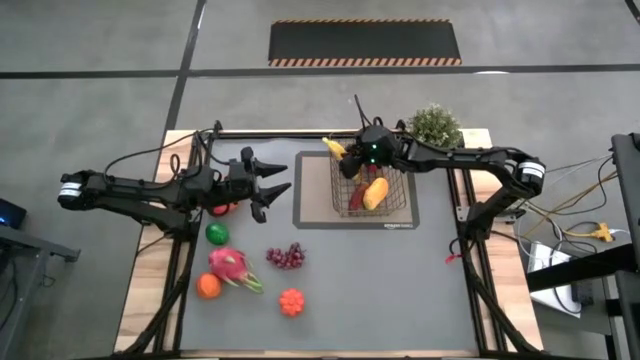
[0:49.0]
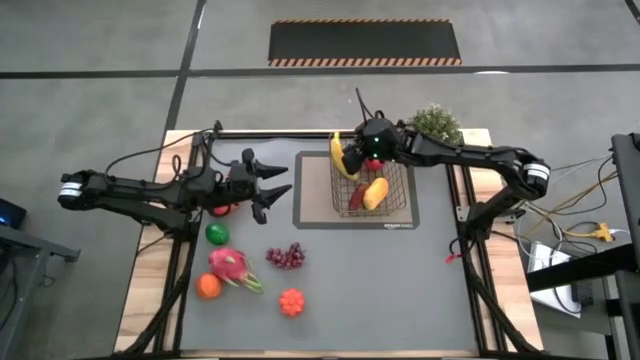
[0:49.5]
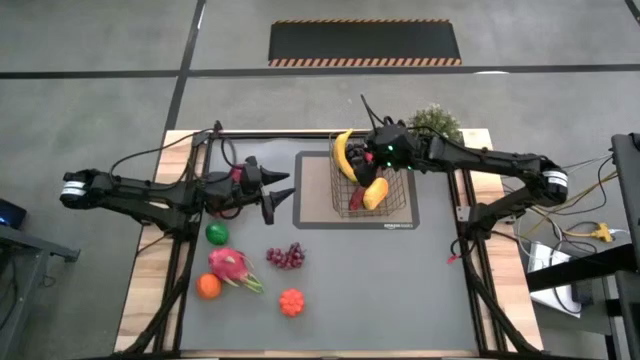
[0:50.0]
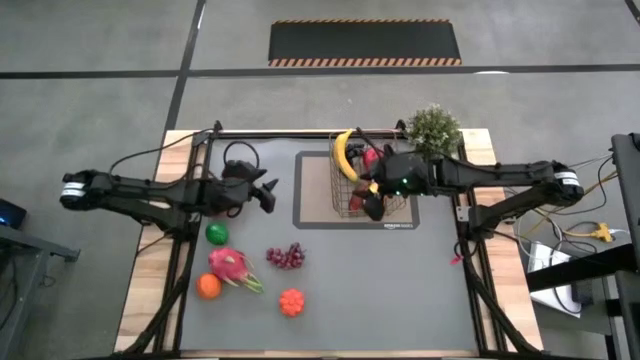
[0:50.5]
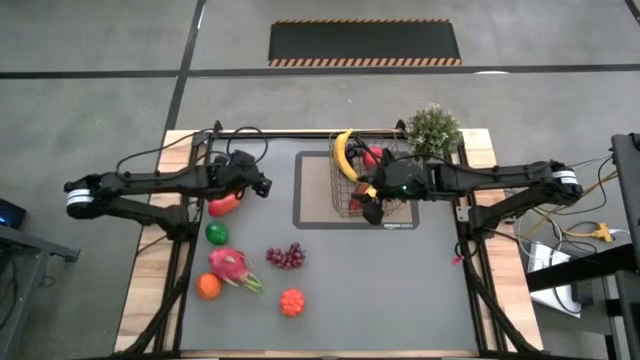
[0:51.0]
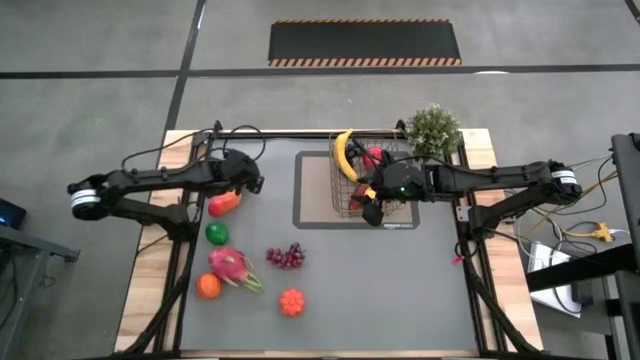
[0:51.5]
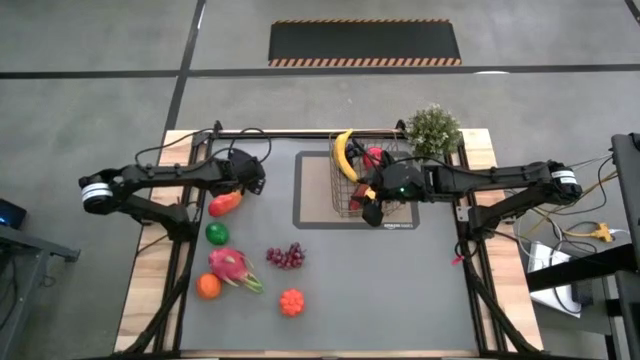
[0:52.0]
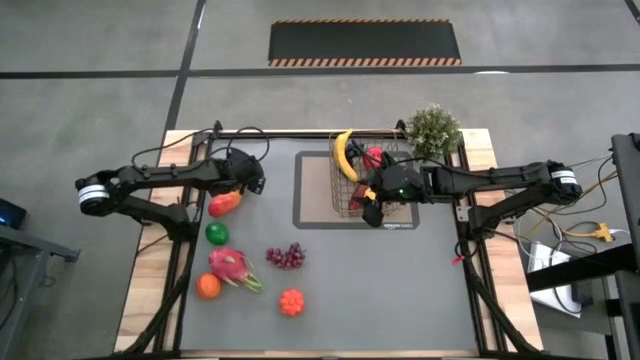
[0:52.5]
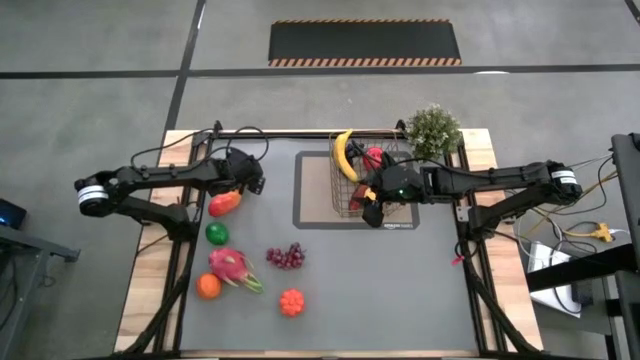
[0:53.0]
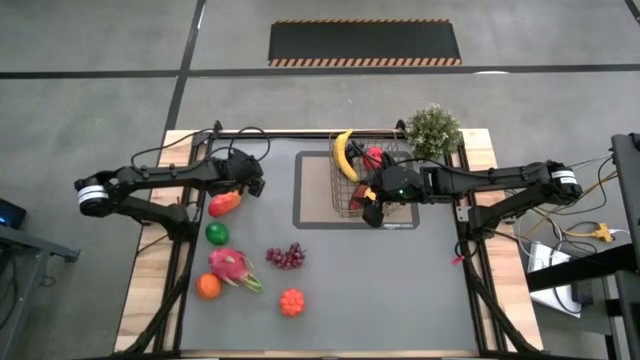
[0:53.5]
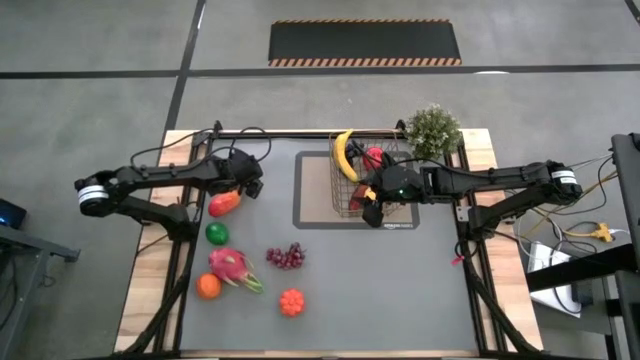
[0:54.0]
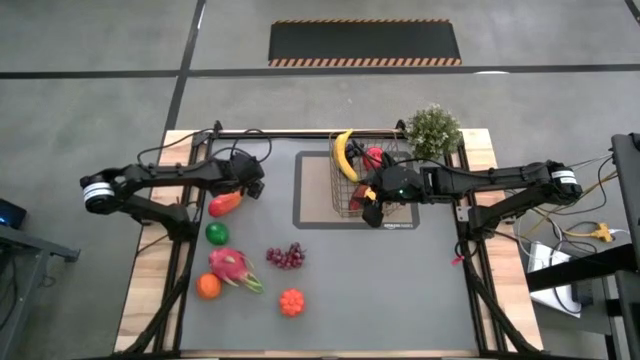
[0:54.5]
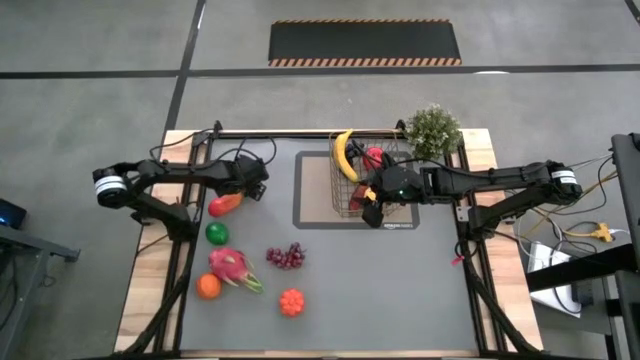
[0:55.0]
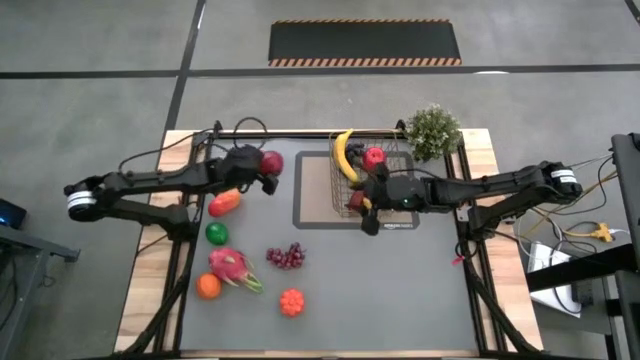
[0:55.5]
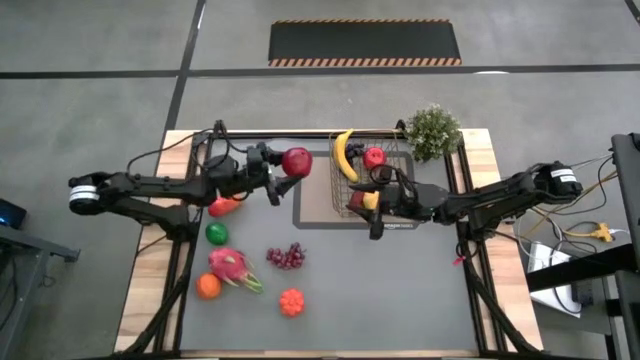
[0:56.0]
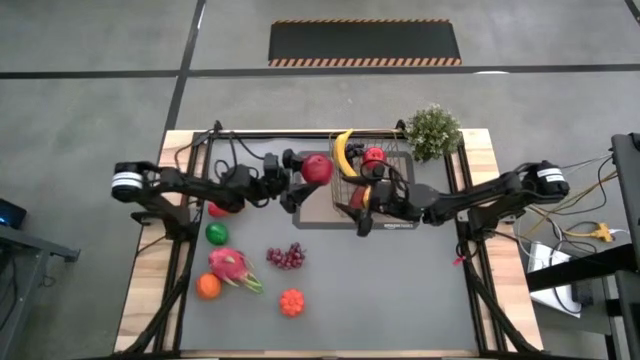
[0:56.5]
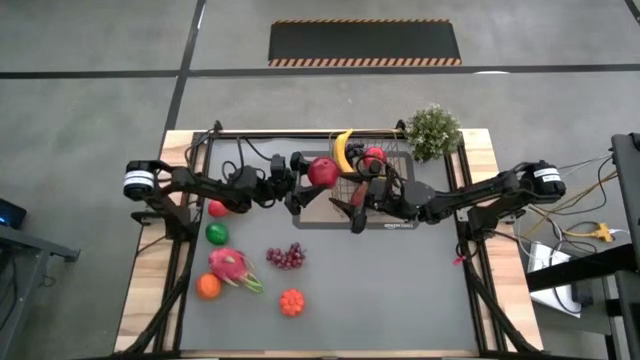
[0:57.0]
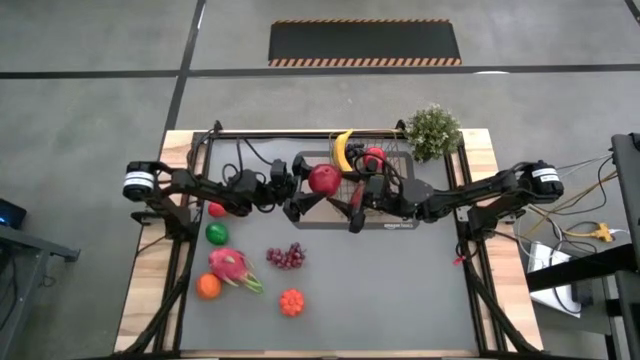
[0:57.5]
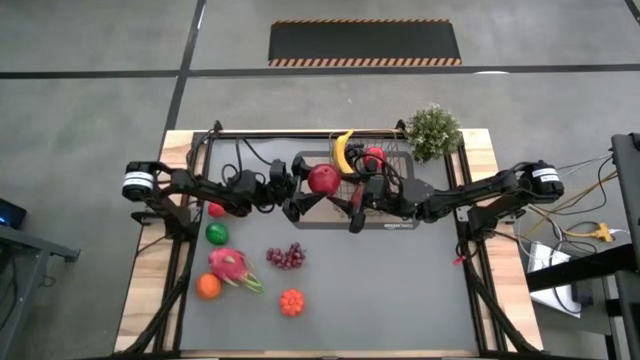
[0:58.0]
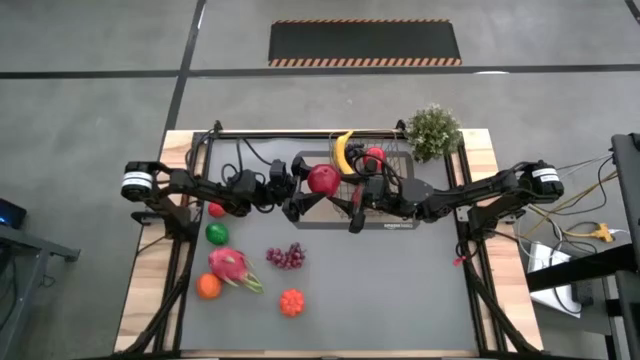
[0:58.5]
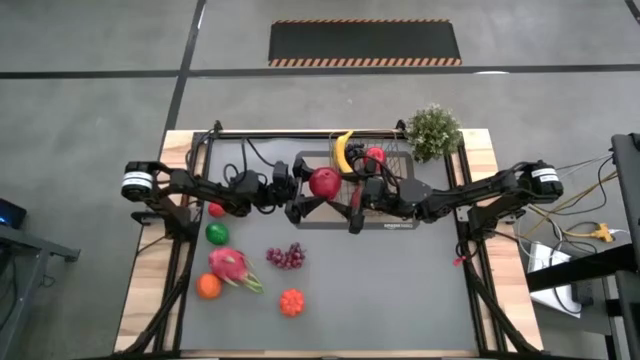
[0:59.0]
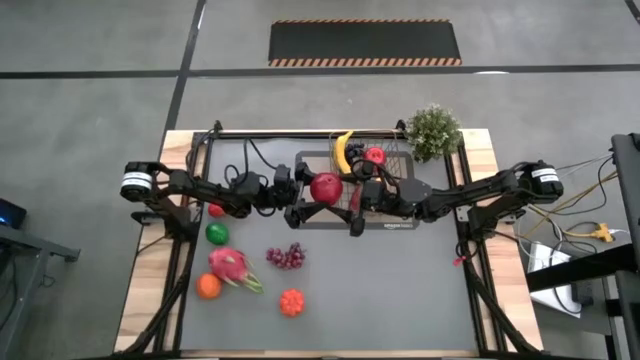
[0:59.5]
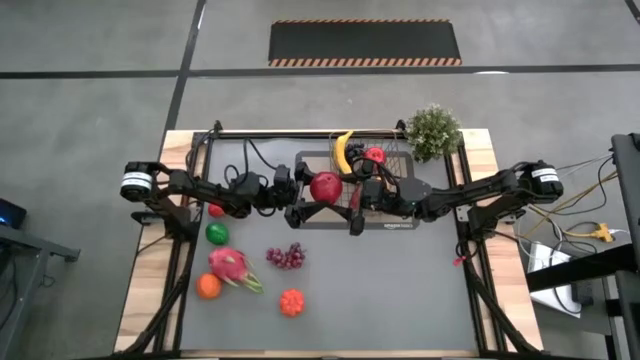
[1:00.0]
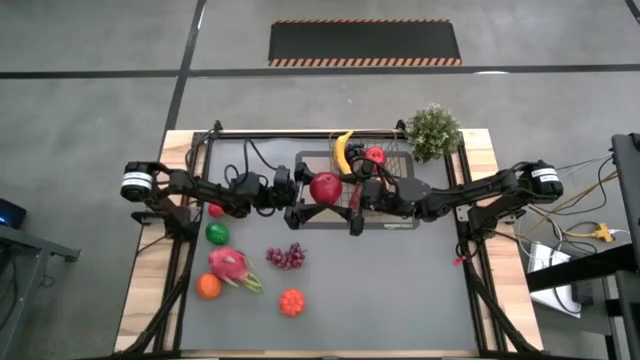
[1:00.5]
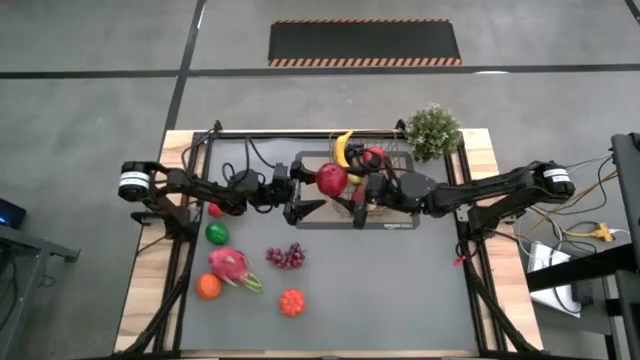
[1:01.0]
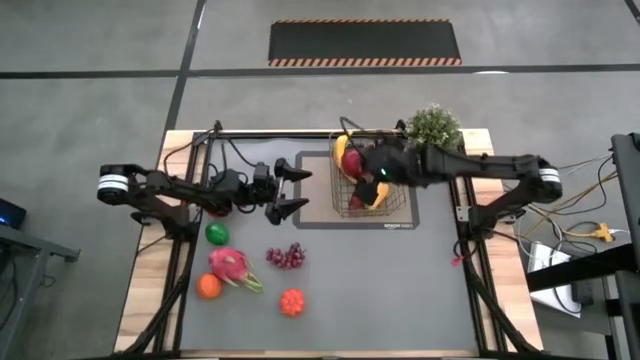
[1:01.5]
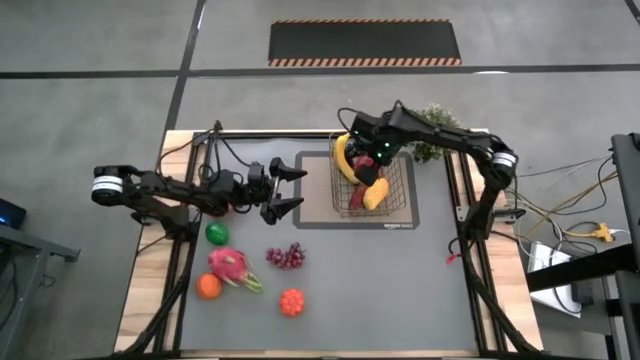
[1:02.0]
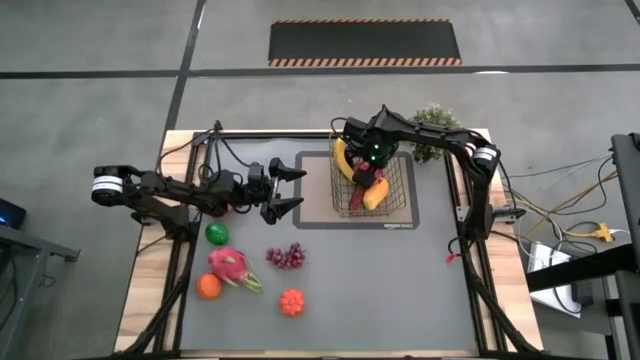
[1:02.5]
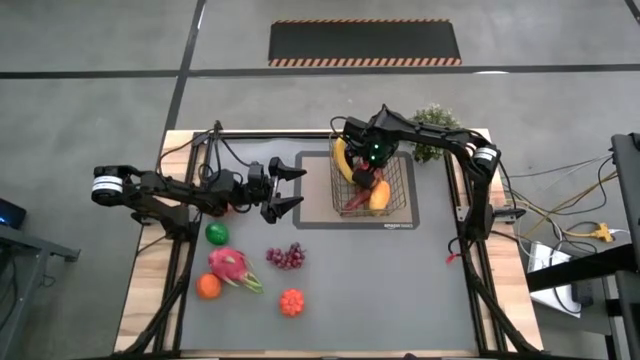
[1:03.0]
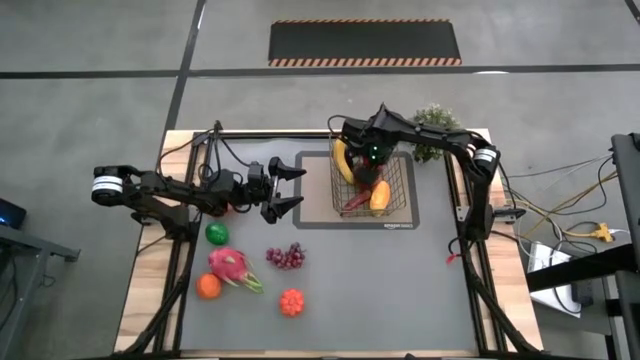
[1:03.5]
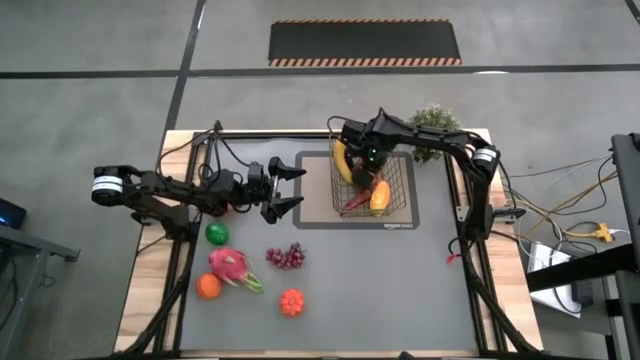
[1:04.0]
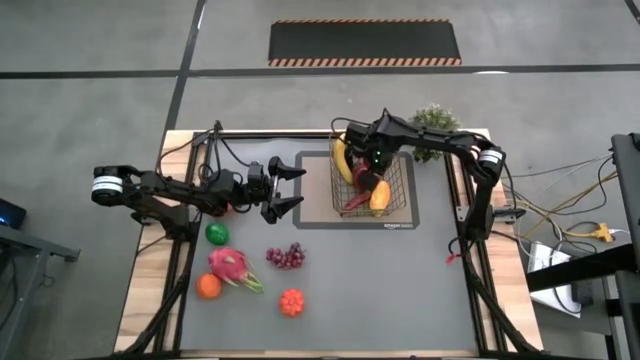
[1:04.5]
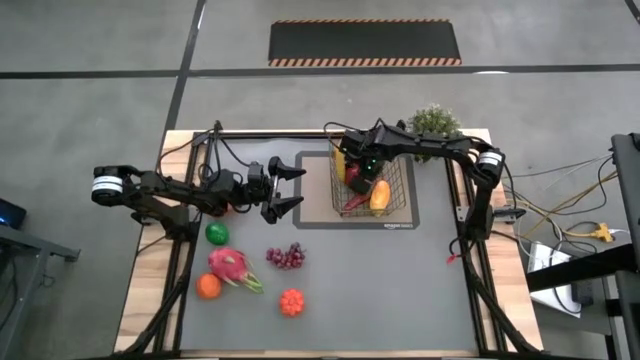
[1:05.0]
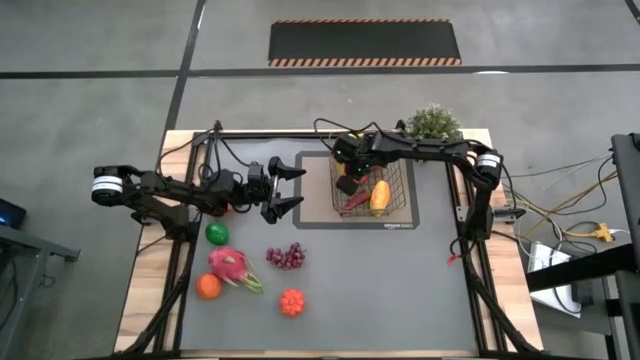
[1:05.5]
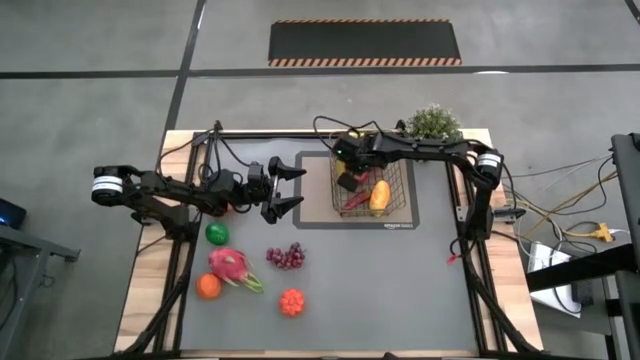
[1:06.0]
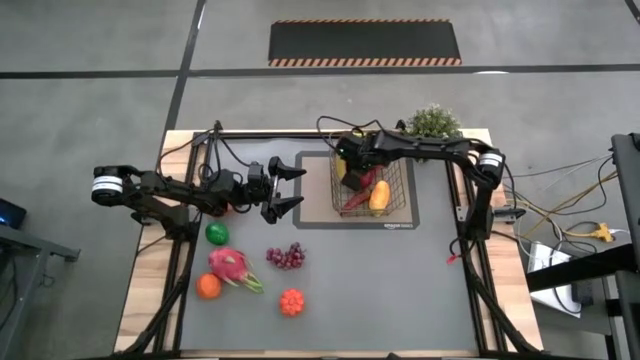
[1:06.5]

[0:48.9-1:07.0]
Task: Build produce basket
Put the pomegranate into the wire basket

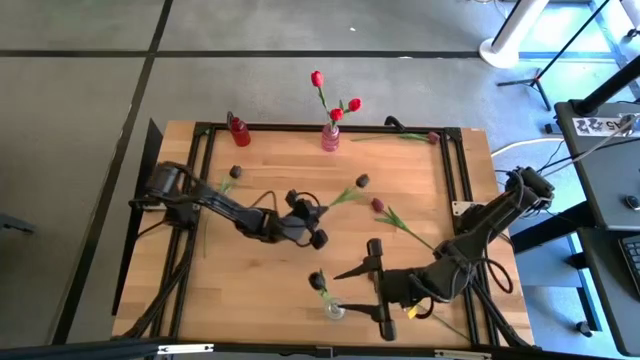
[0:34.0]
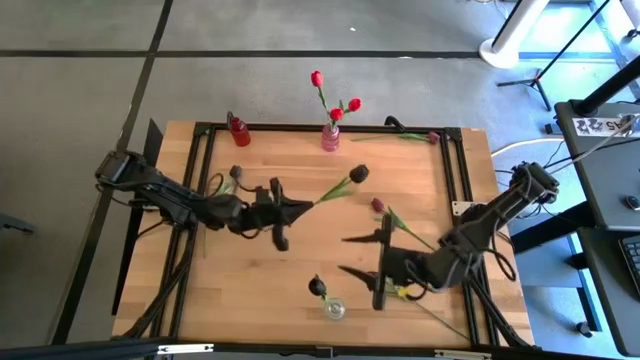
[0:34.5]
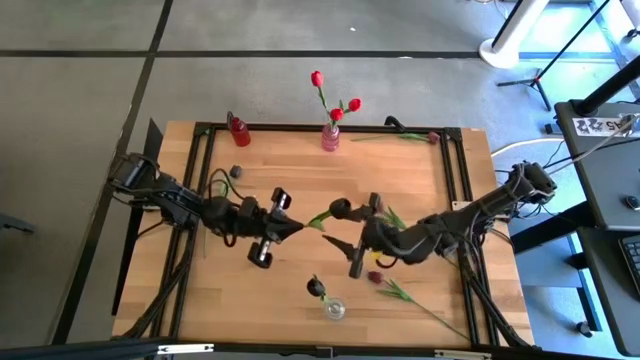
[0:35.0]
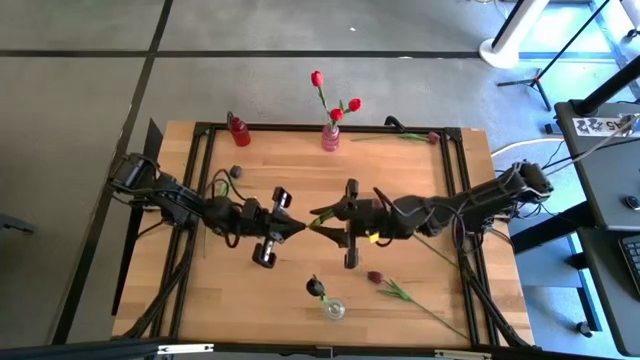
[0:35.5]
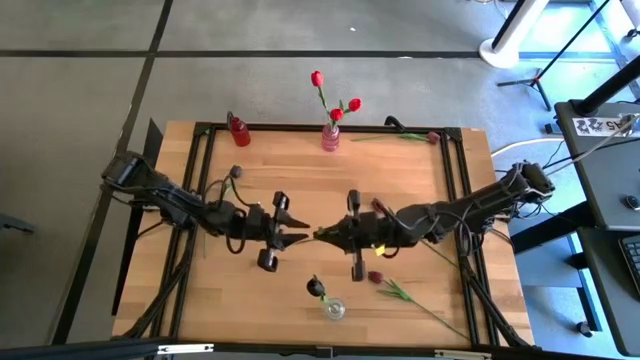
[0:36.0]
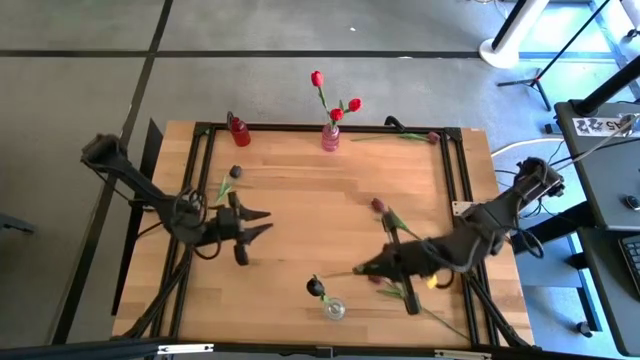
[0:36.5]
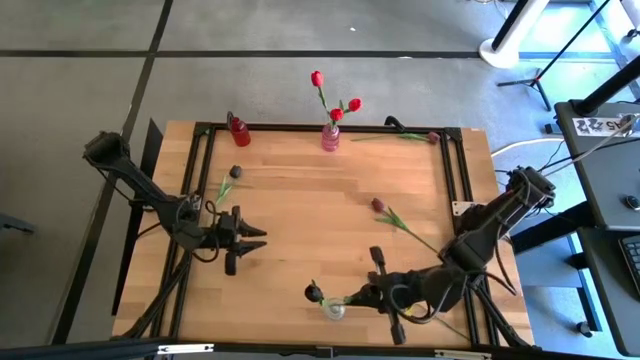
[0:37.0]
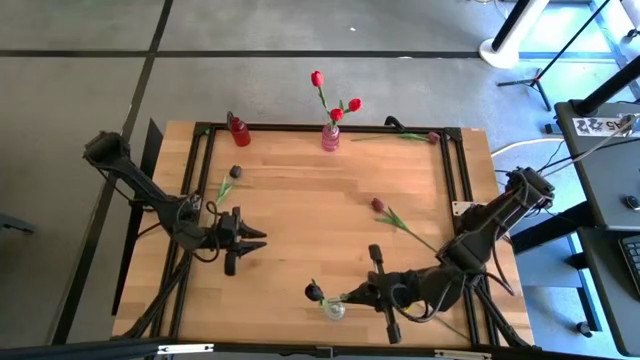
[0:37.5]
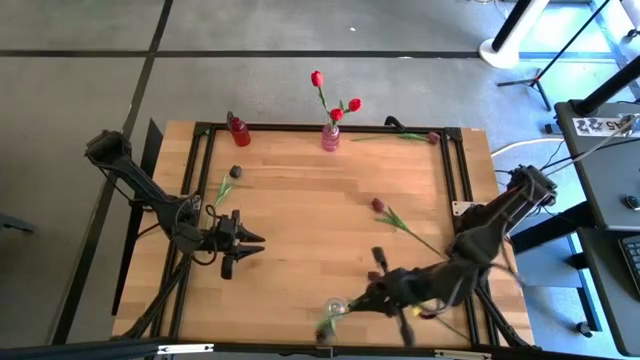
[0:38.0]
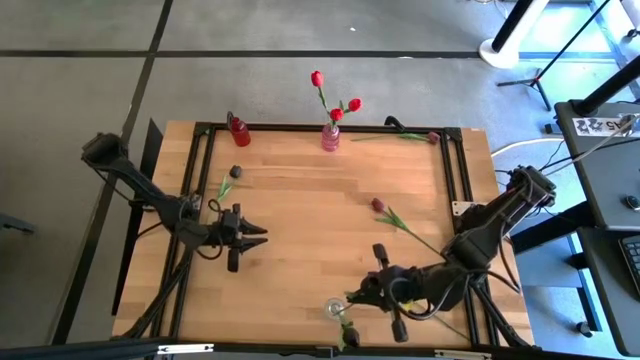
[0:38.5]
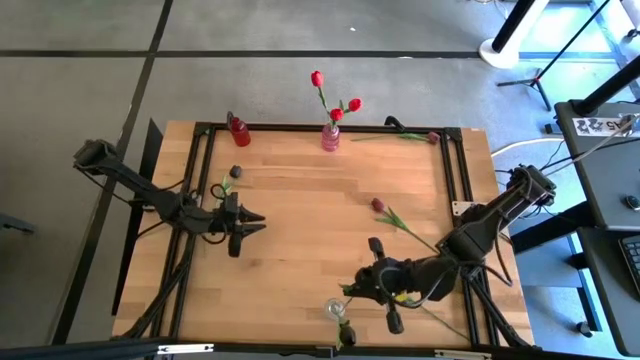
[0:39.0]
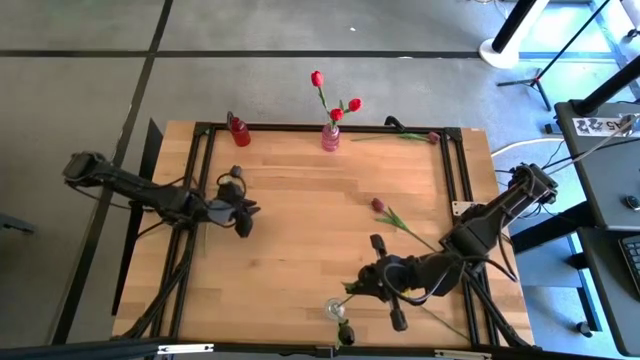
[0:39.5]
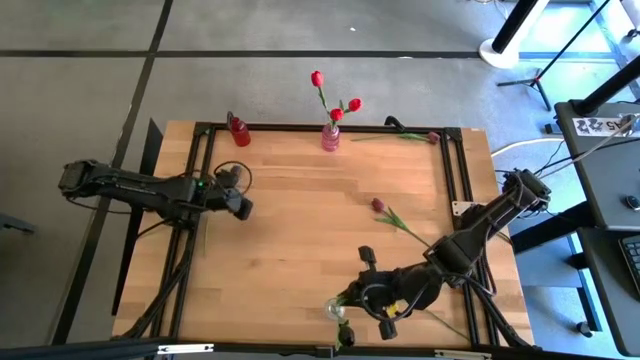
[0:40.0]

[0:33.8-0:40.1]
Task: Sort flowers into vase by color
Put the right black flower into the transparent flower vase
